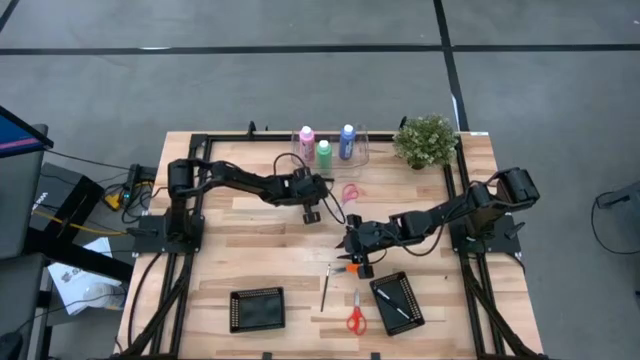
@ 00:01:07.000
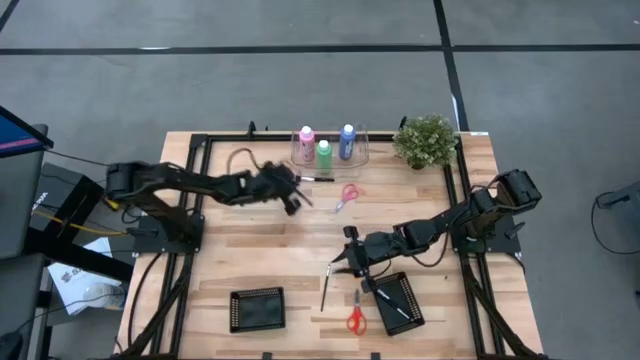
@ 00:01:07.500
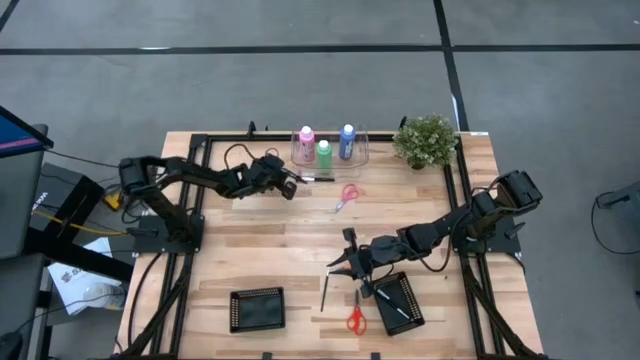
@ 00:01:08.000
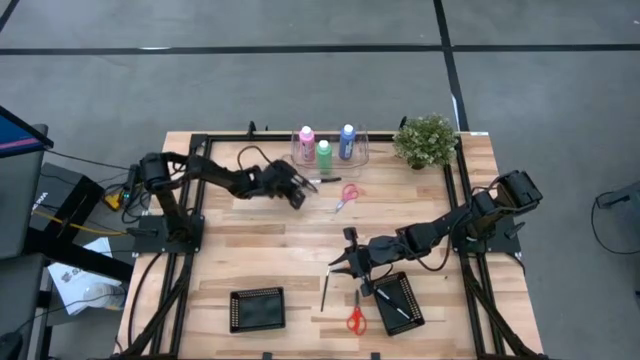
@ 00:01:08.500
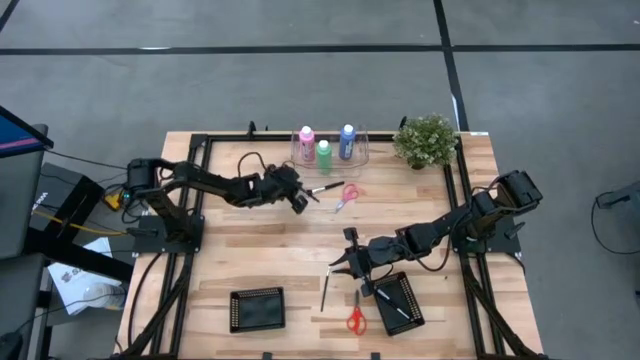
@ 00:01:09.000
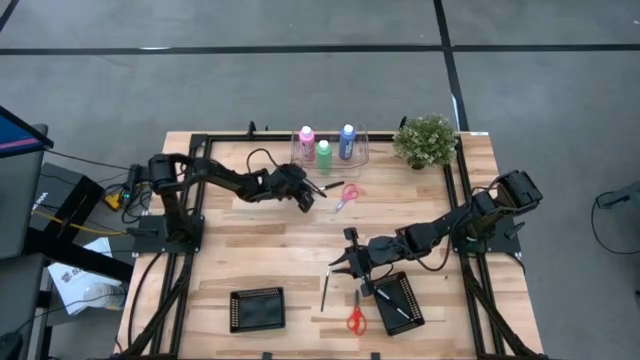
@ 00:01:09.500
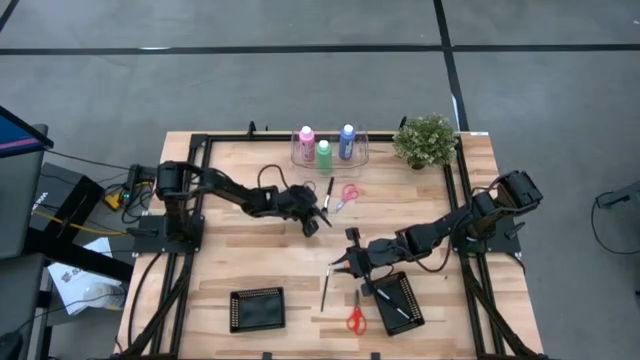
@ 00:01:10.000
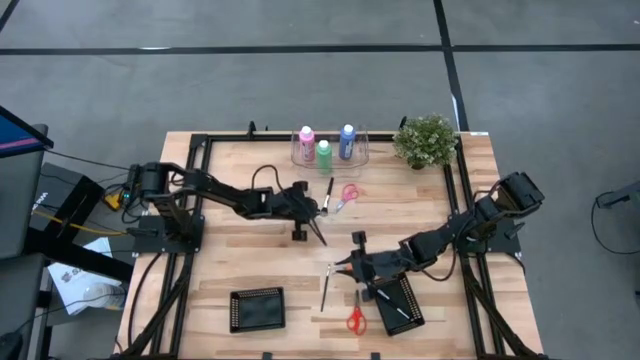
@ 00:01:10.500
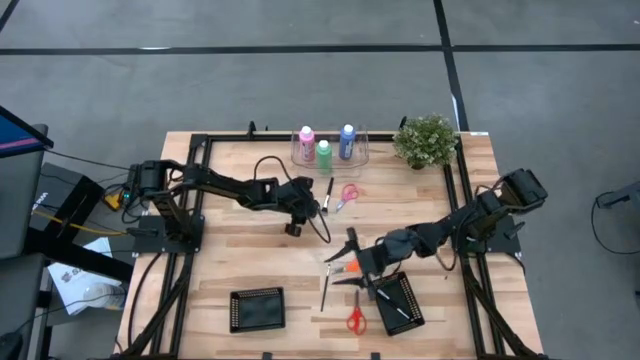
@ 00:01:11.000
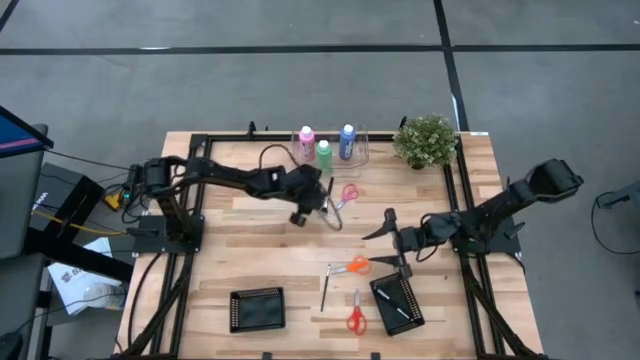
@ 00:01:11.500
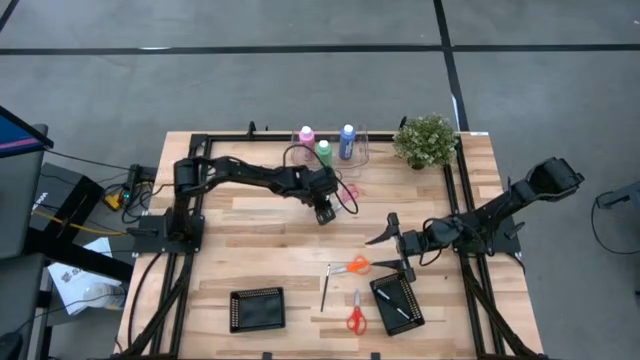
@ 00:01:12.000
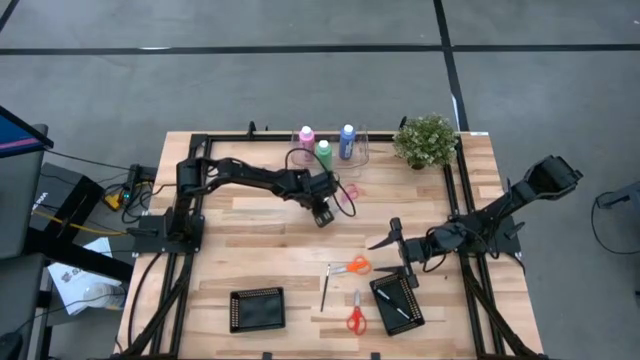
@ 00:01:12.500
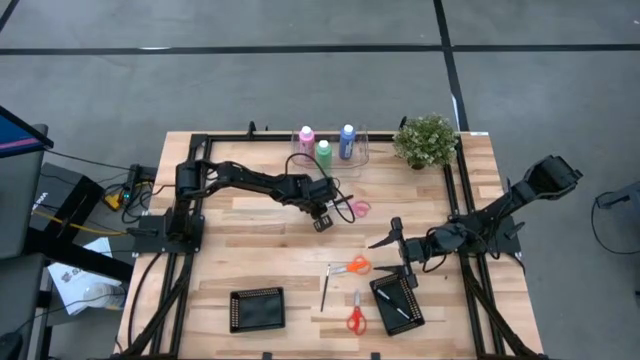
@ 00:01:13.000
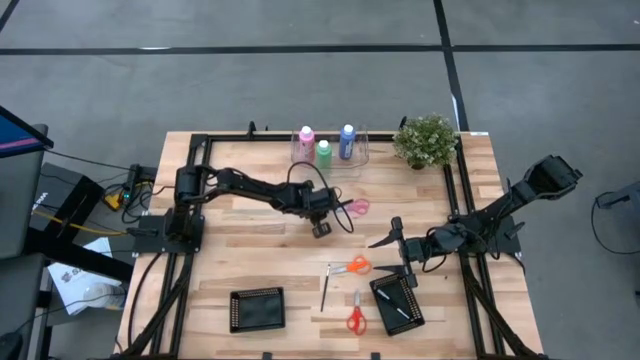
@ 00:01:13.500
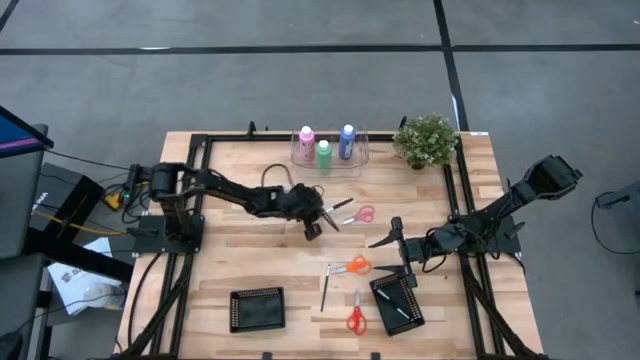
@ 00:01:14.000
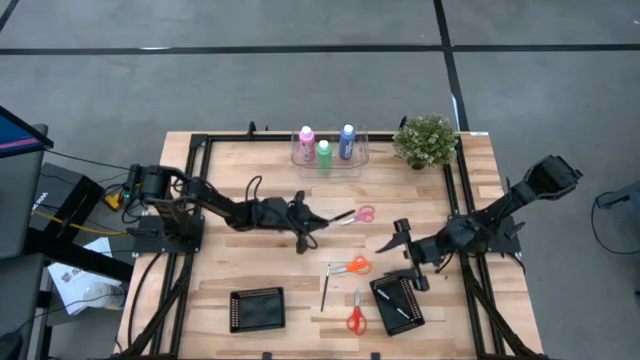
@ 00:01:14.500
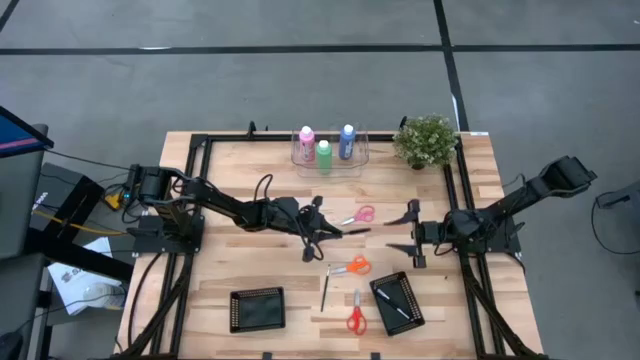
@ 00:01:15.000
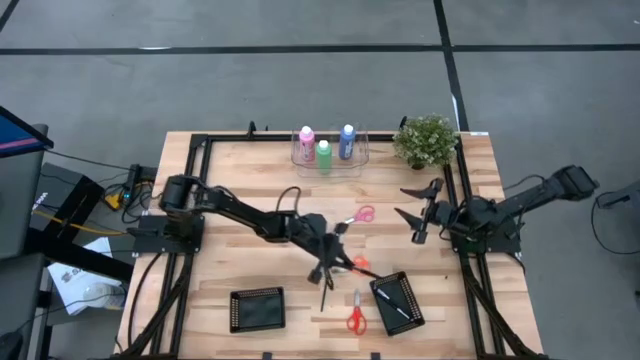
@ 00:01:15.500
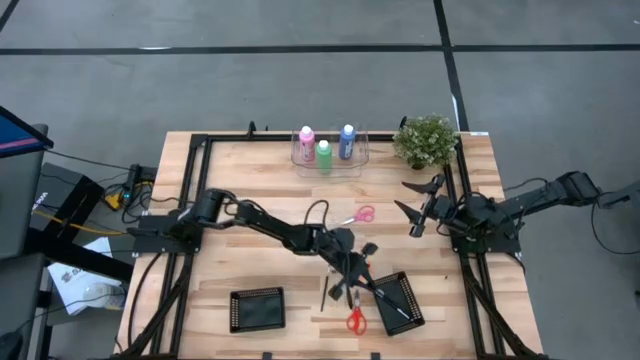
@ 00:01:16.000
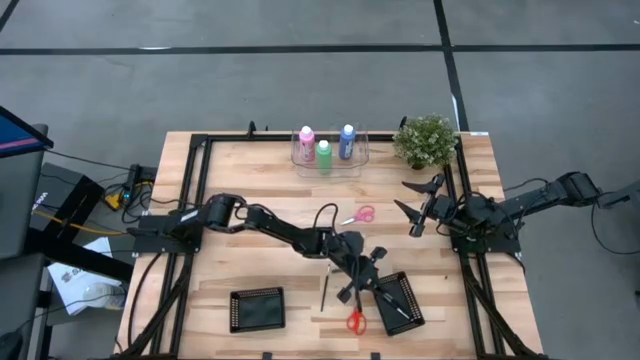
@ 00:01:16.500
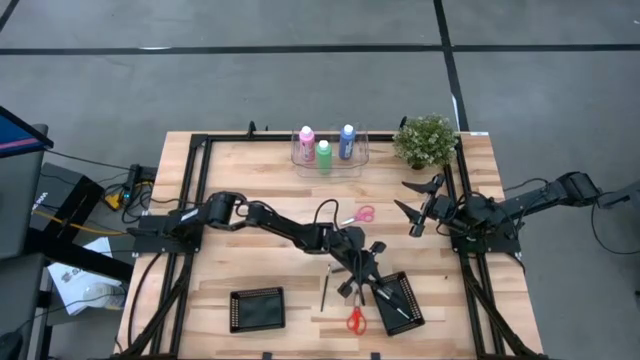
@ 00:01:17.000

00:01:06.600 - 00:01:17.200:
Task: Pick & Place Paint Supplies
Put the black paint brush into the right black bin

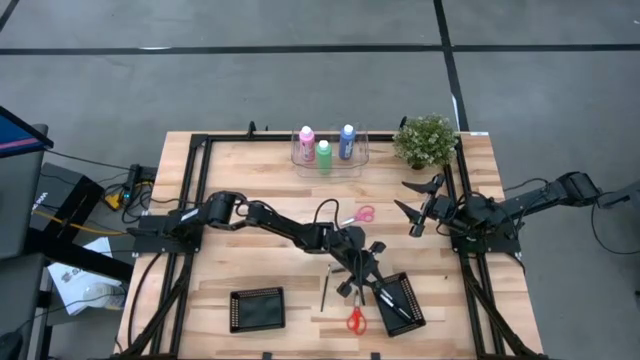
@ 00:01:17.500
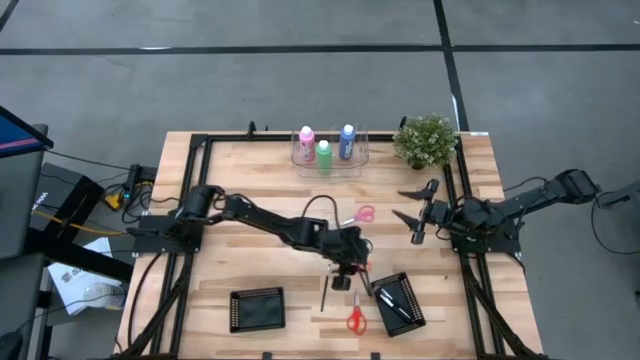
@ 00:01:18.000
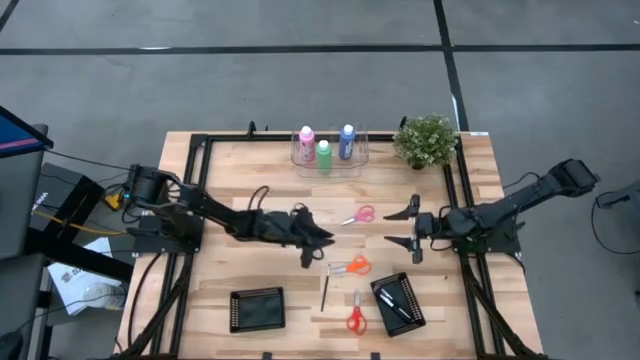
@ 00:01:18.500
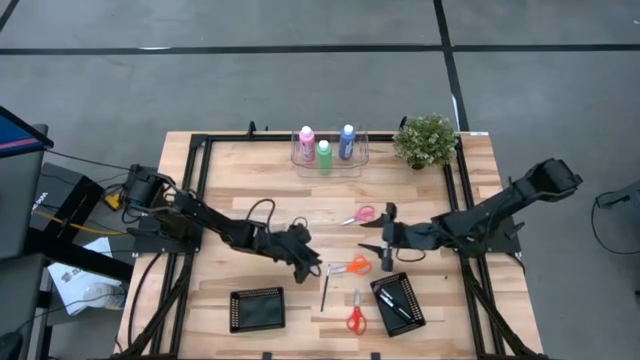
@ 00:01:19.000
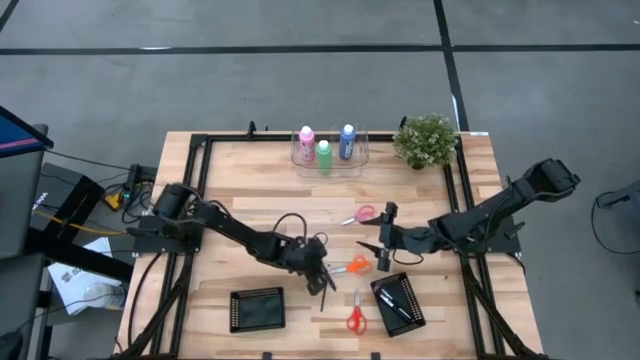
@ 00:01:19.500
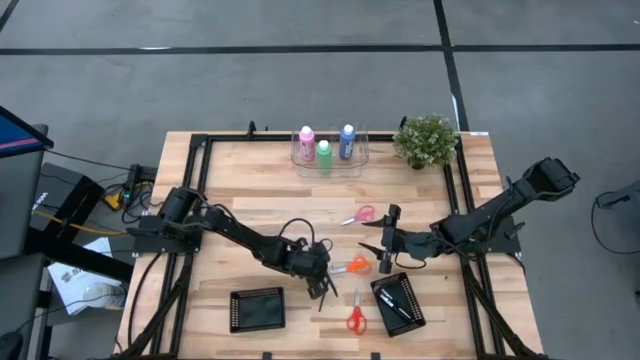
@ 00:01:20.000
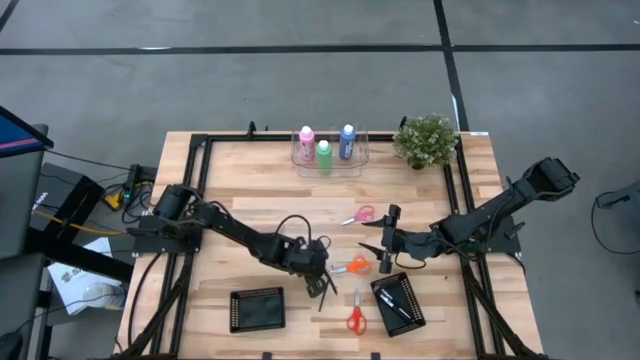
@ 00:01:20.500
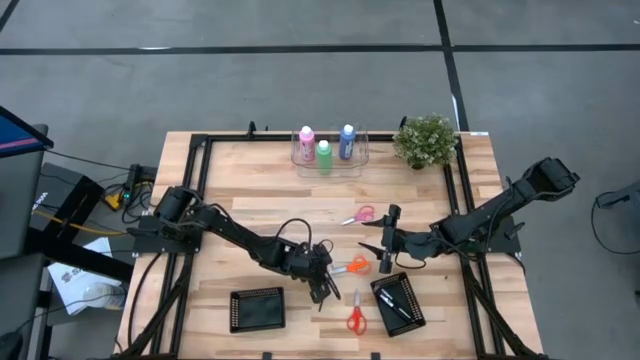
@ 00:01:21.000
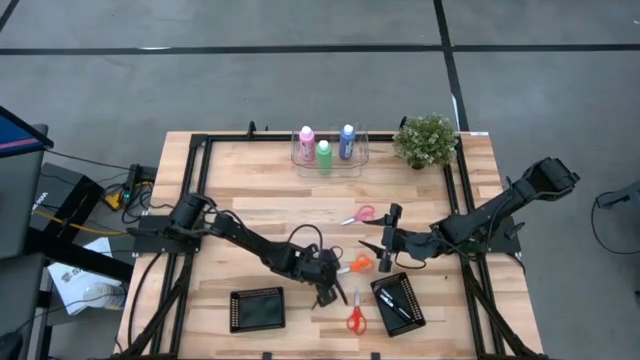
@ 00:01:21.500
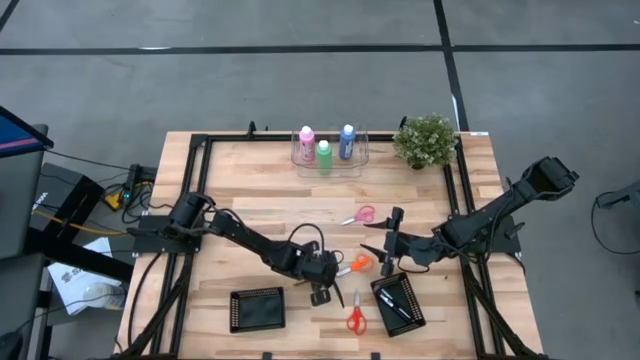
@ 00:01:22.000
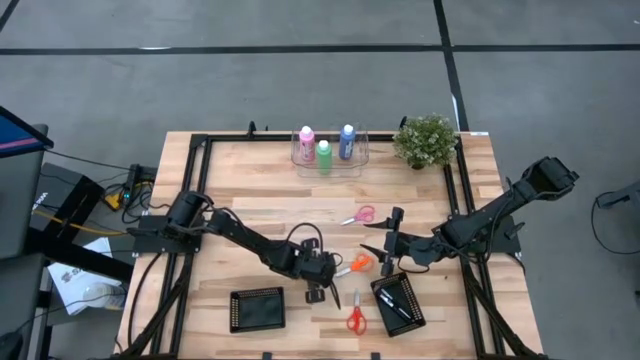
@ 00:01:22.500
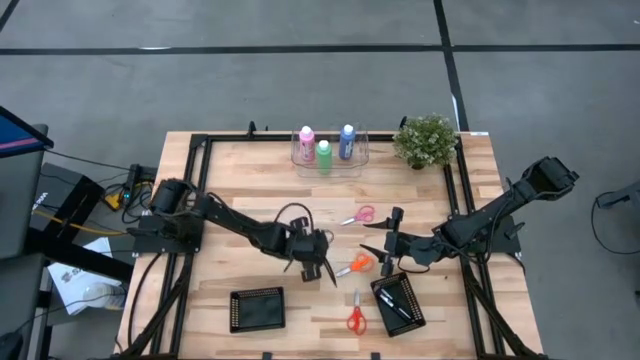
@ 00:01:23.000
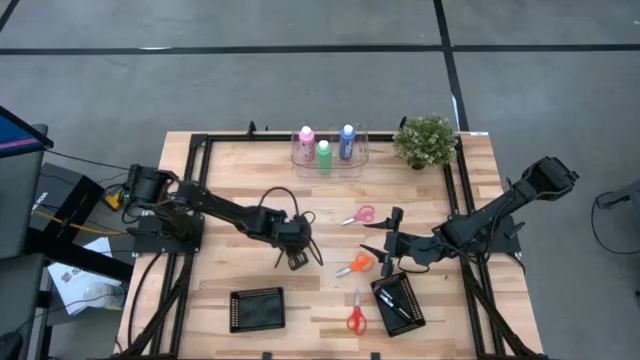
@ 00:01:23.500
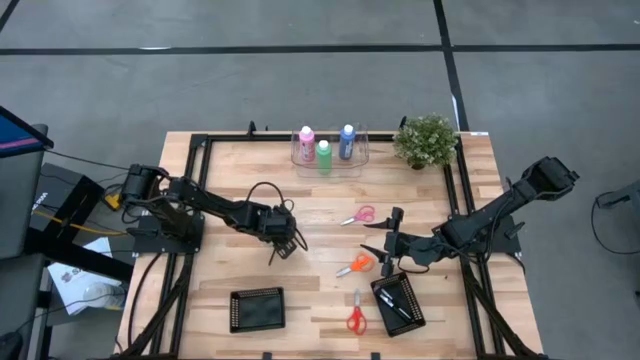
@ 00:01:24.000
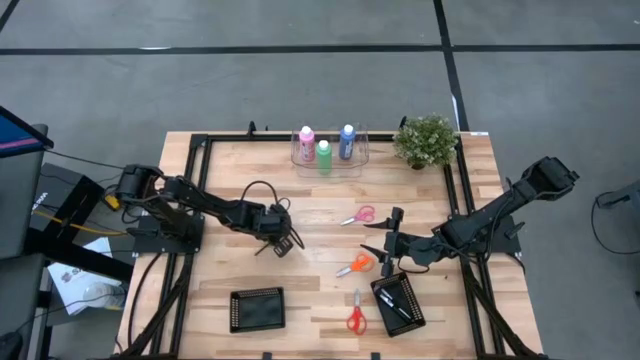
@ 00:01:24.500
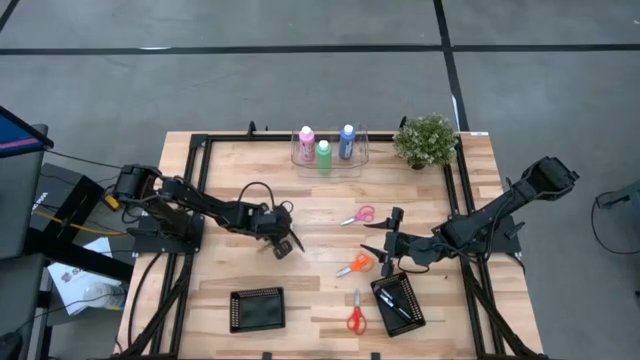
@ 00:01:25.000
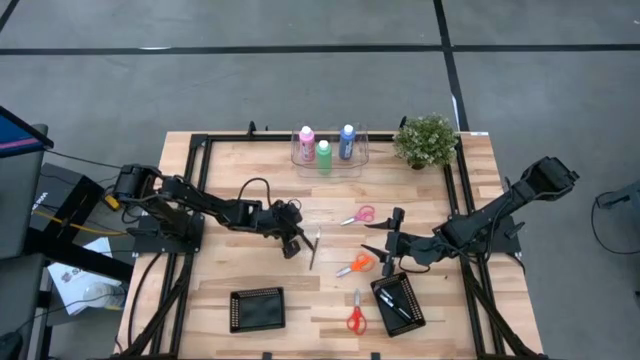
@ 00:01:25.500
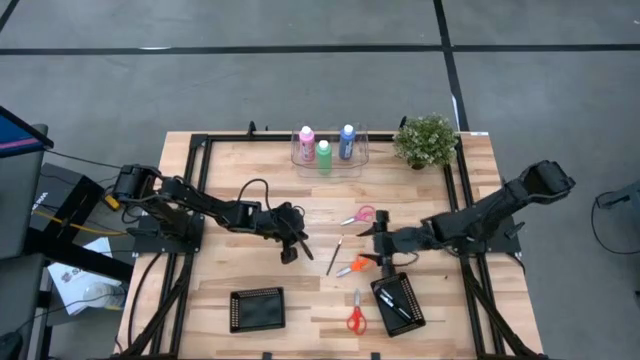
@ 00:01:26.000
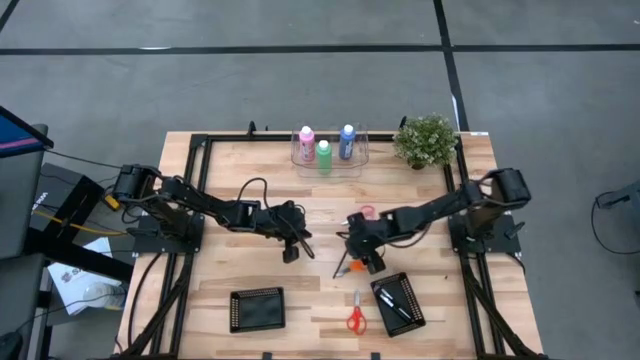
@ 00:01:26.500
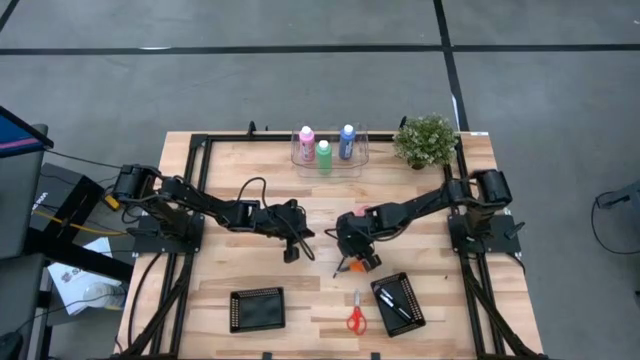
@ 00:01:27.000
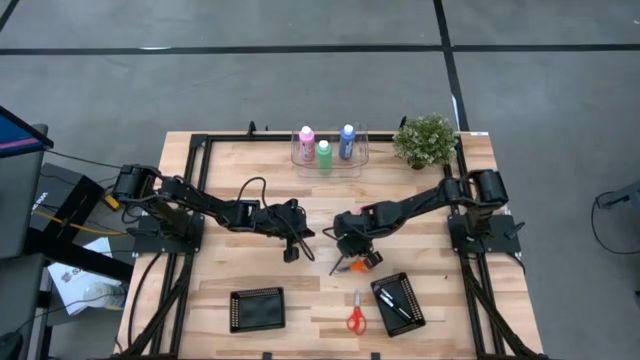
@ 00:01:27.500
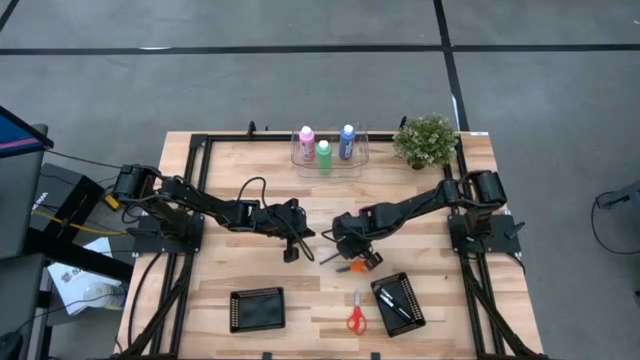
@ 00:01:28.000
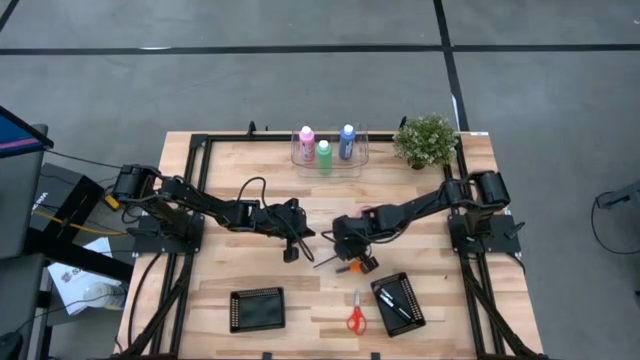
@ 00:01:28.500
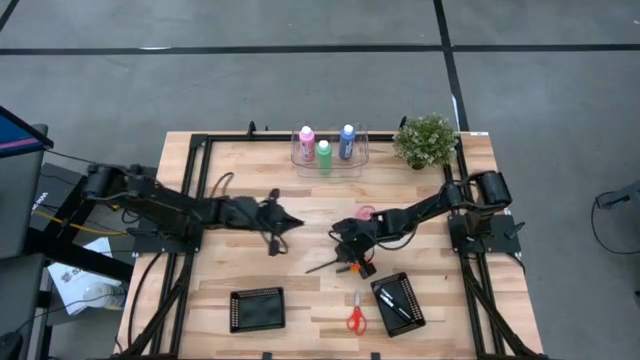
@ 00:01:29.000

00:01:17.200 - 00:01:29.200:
Put the black paint brush into the right black bin
